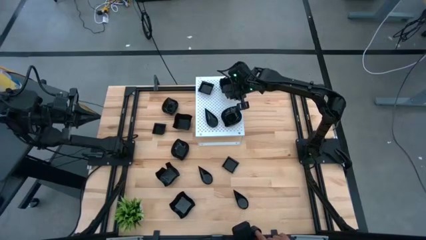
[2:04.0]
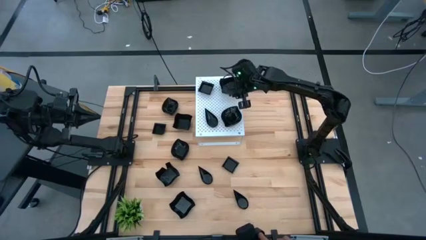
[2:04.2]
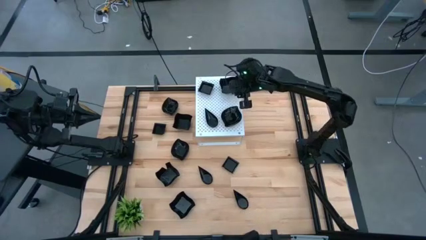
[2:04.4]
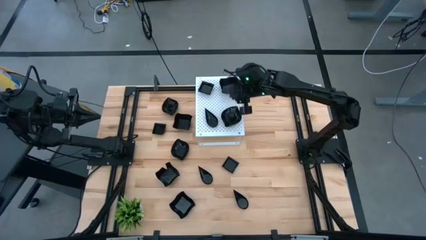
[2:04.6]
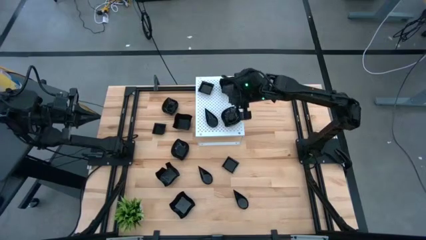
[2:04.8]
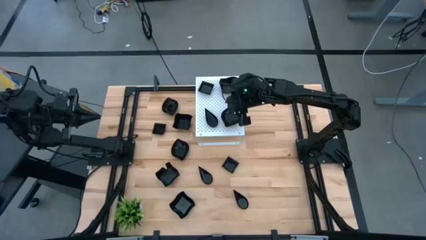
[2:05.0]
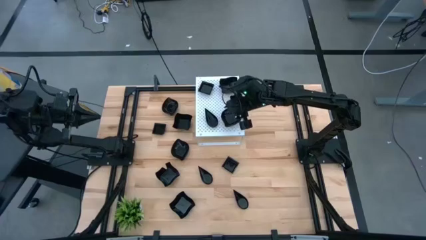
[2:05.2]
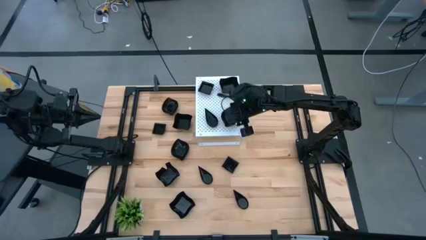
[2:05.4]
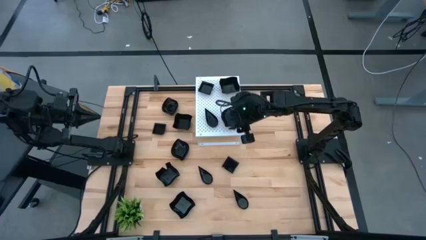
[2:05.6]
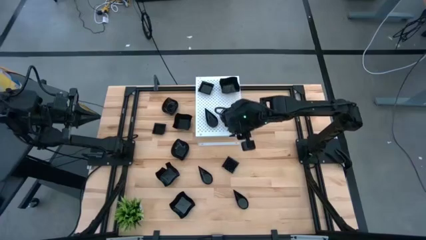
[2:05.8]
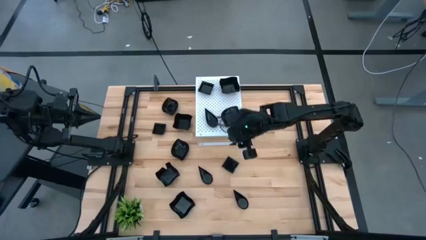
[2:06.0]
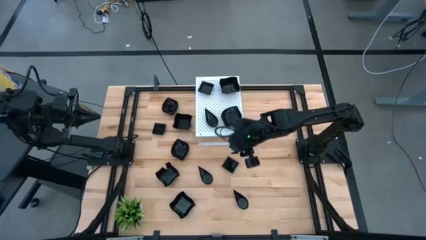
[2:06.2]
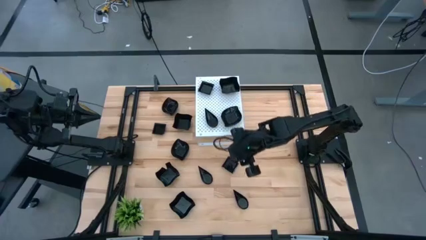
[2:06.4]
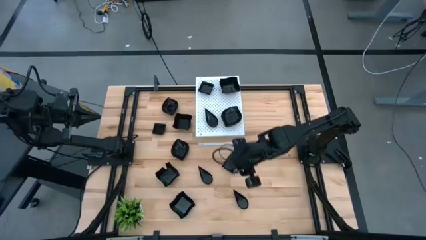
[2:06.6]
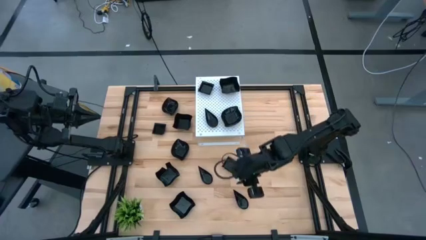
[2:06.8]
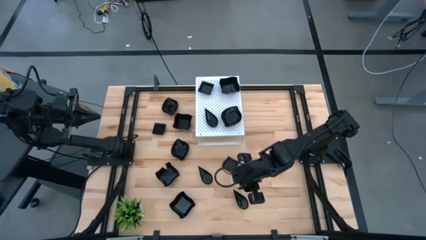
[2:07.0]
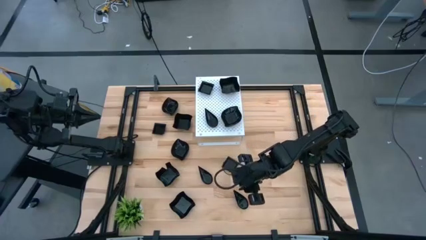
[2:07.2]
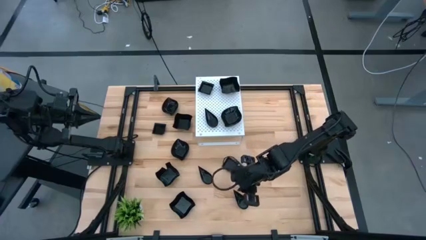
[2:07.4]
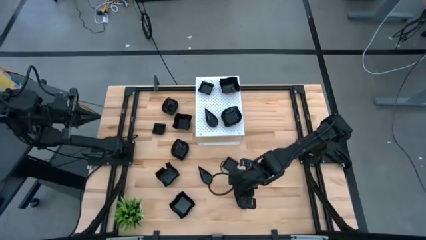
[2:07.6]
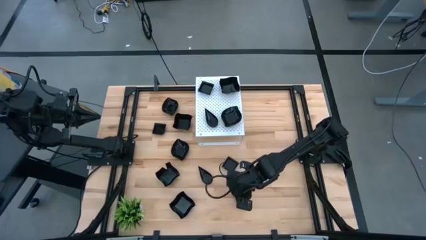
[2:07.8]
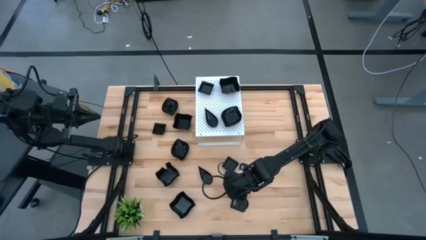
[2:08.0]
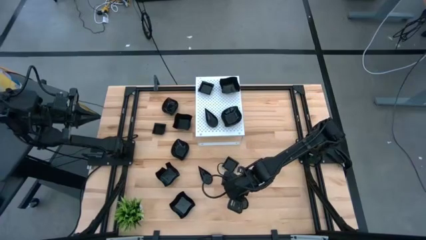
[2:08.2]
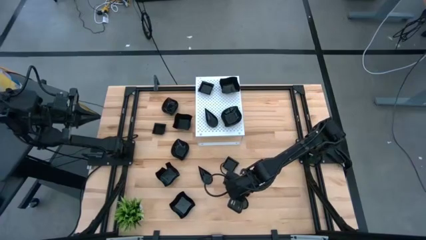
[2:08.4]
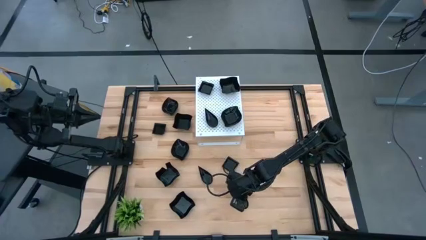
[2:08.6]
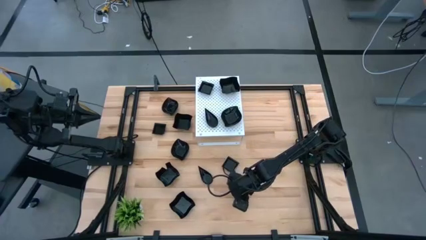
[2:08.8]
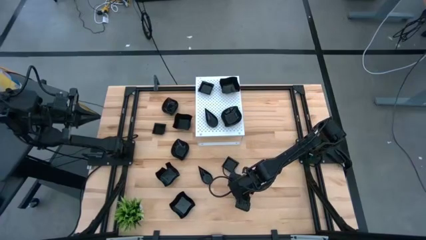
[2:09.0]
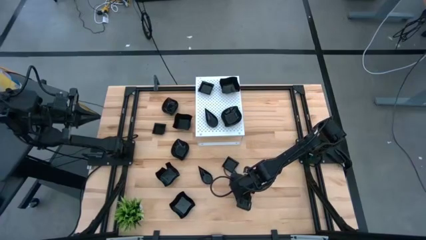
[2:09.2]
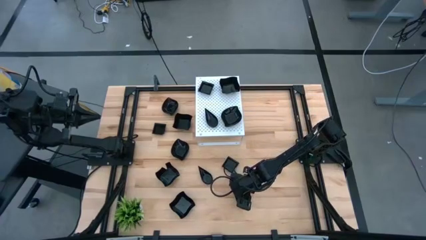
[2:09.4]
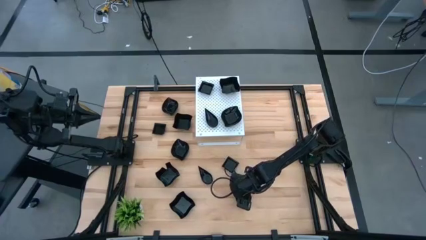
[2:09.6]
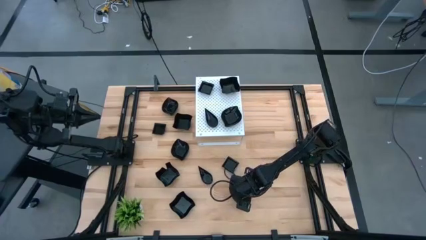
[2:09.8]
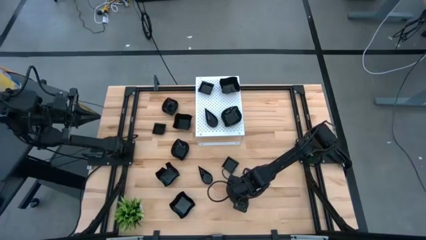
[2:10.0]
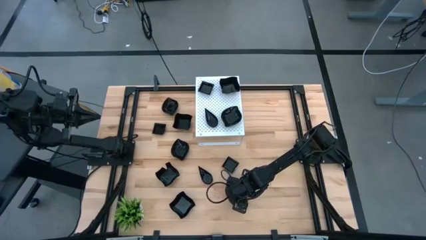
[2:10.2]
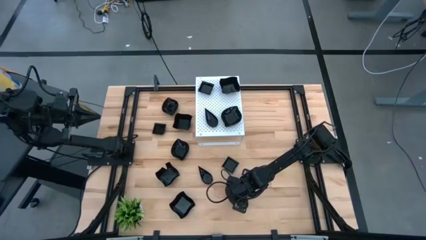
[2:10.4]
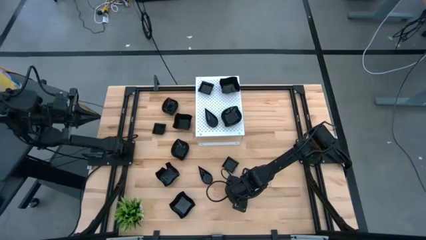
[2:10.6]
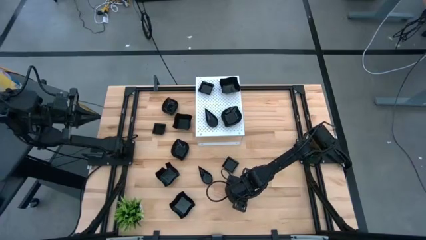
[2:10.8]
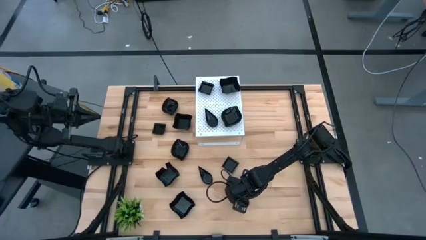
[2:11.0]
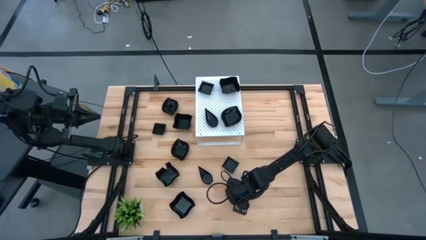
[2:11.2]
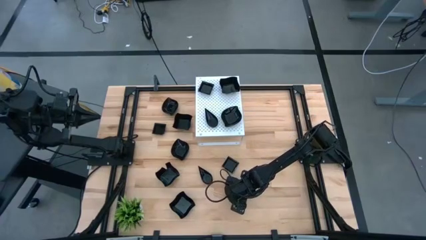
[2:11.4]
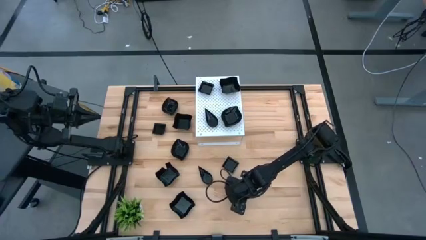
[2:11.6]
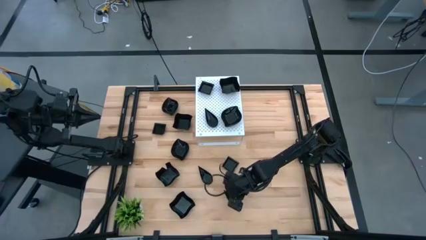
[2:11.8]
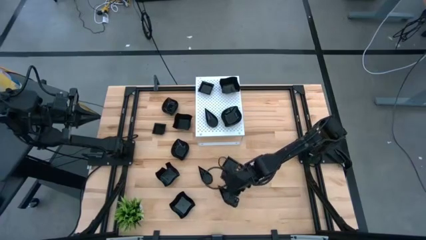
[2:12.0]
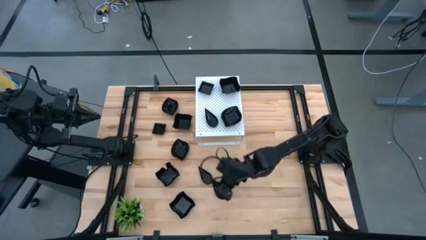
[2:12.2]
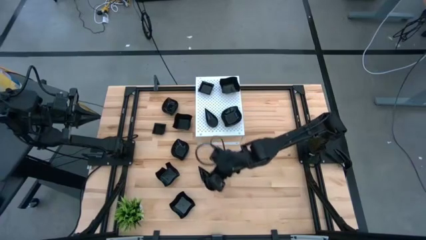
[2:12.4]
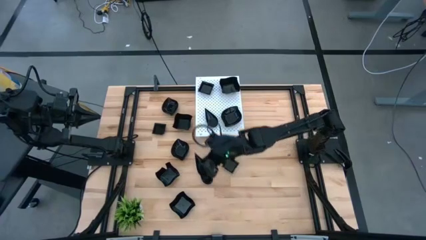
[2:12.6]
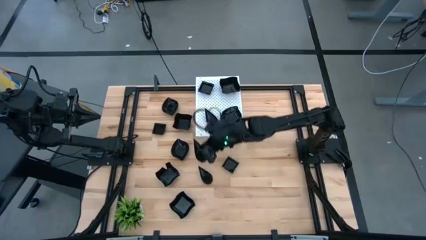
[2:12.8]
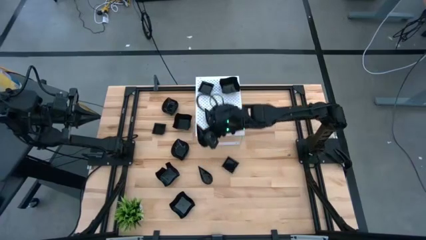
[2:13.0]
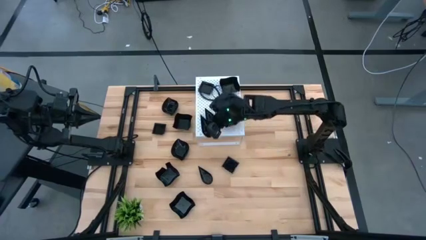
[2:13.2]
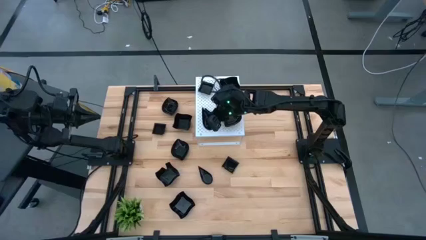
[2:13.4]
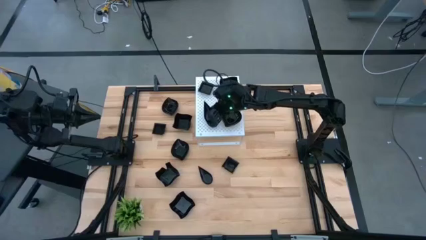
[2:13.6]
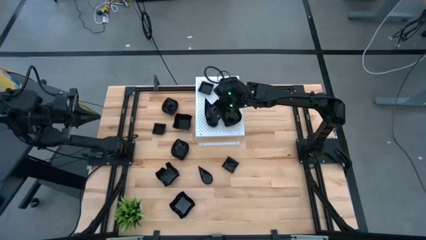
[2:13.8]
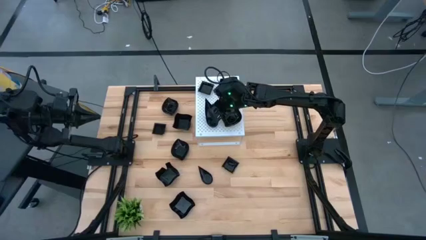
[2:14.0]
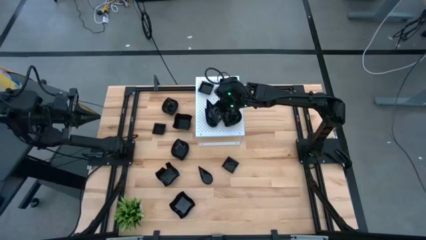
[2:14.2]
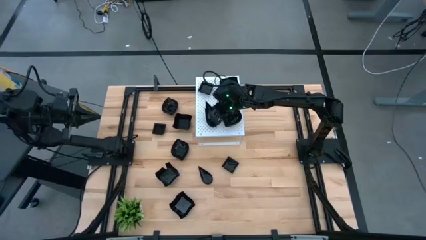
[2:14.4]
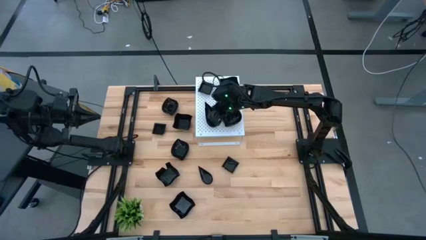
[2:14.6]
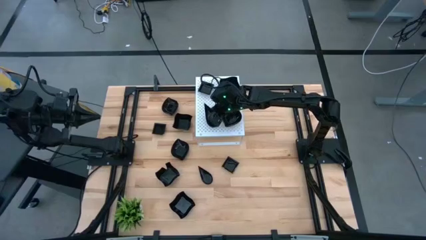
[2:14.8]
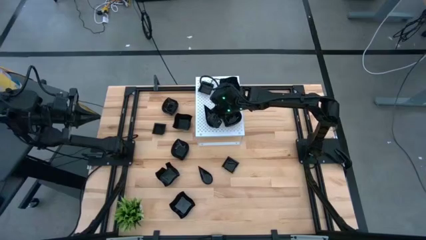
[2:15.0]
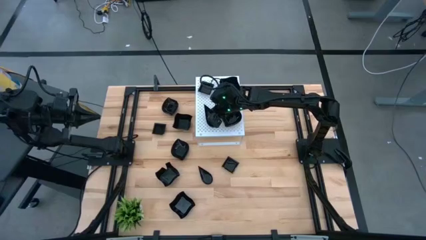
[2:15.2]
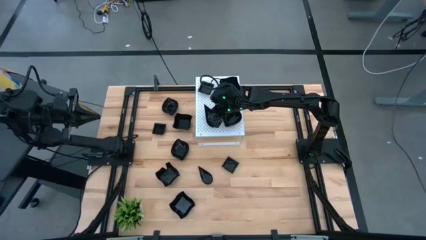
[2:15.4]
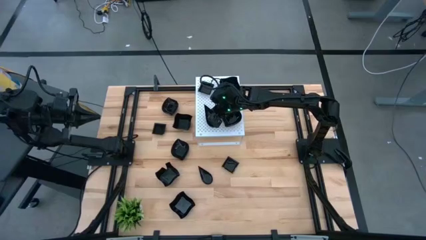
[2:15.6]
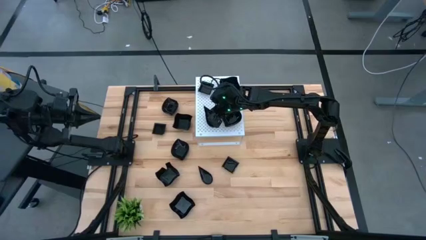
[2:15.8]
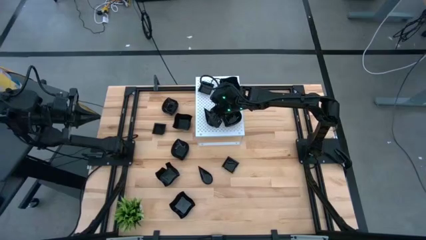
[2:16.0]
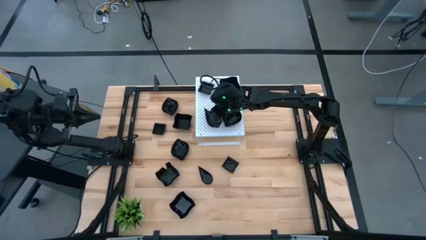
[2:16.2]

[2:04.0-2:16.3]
Task: Pick & Place Mini shaped plates
Stack the drop-shaped plate on top of the drop-shaped plate on the shelf
